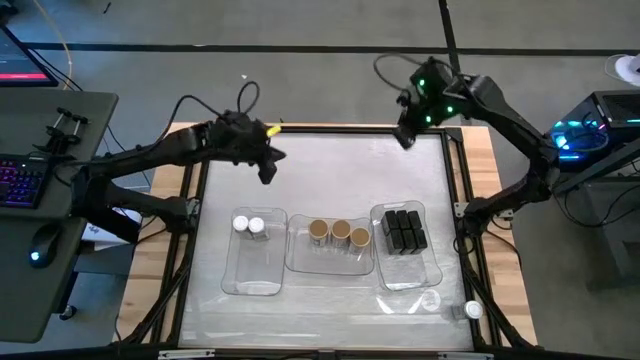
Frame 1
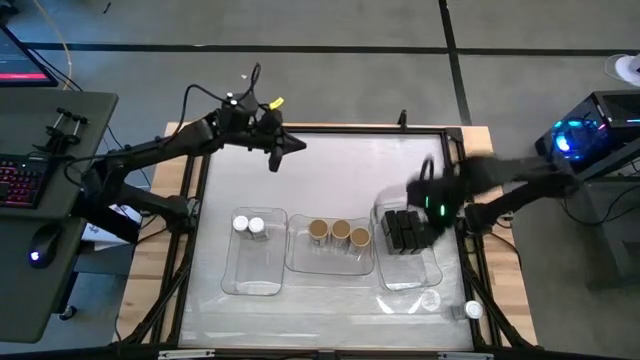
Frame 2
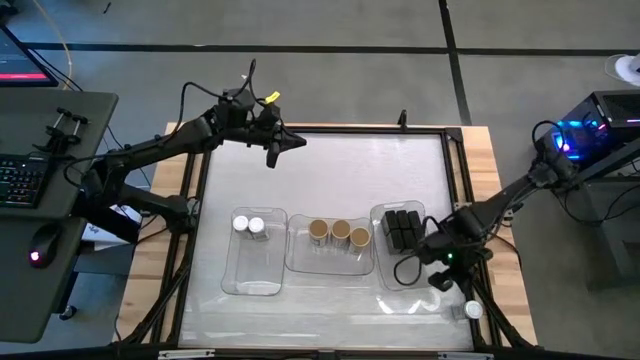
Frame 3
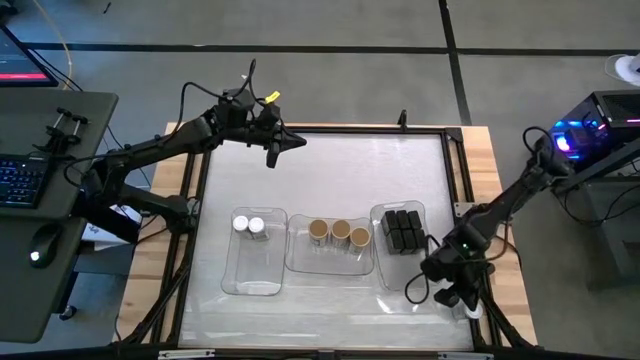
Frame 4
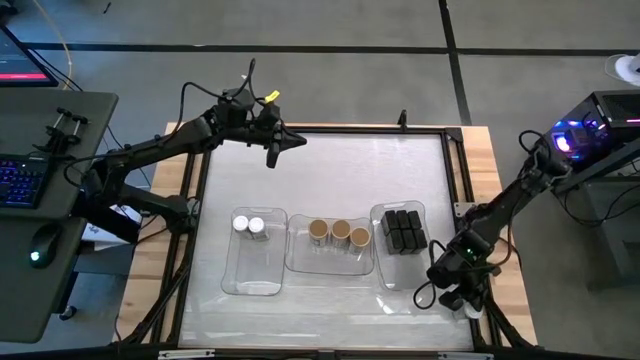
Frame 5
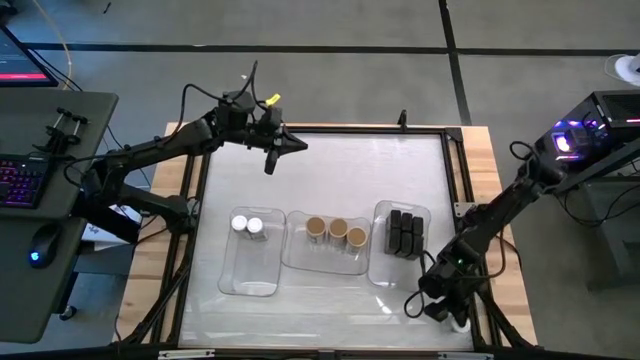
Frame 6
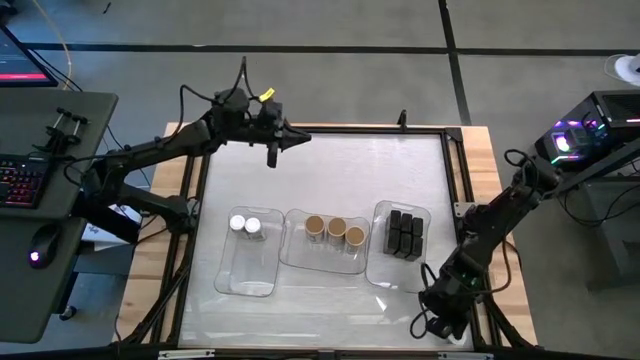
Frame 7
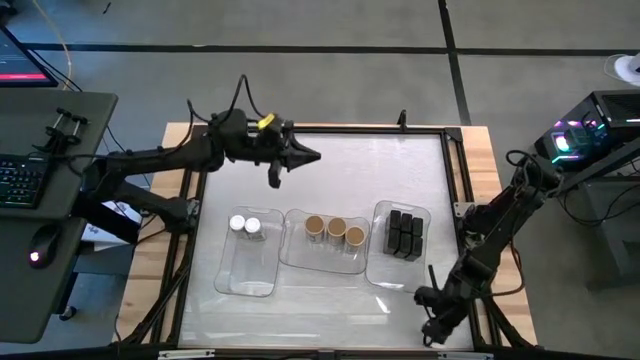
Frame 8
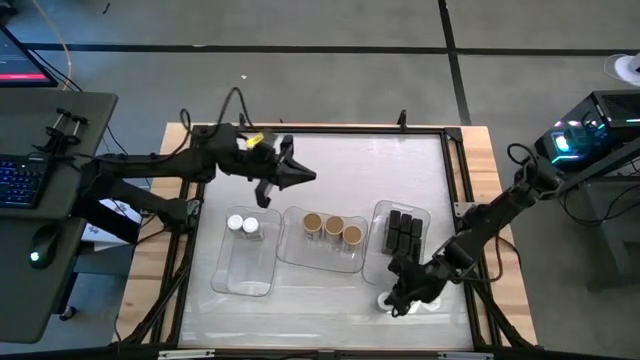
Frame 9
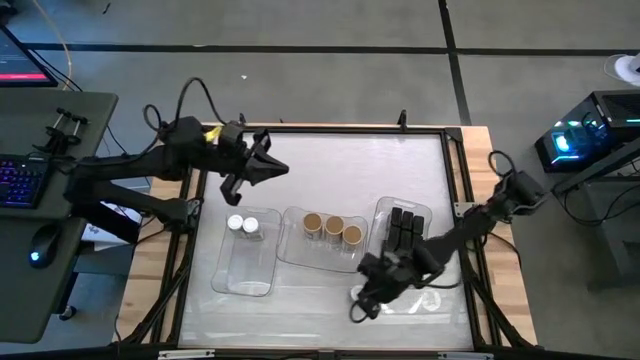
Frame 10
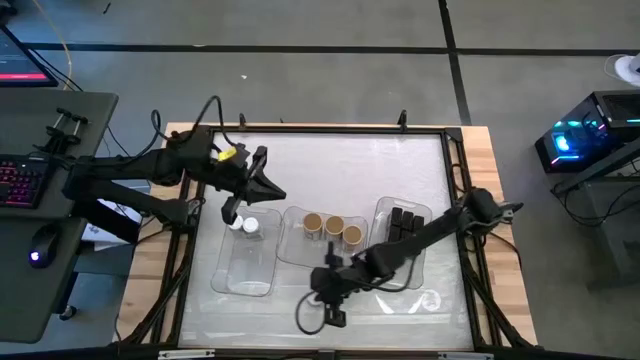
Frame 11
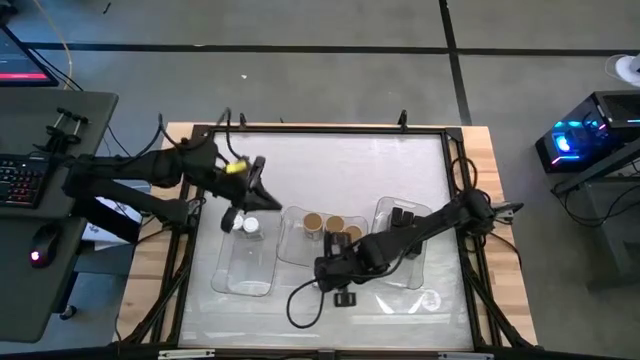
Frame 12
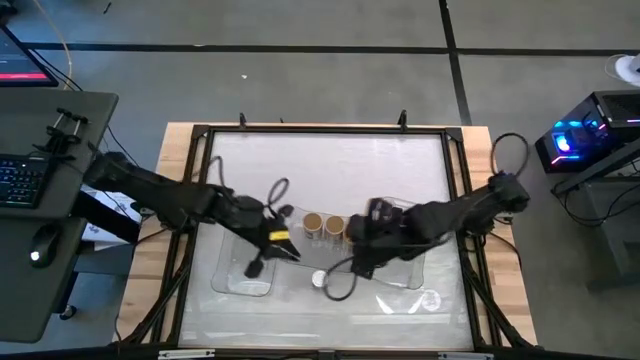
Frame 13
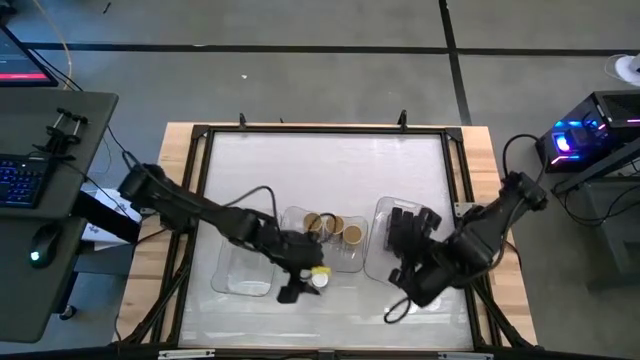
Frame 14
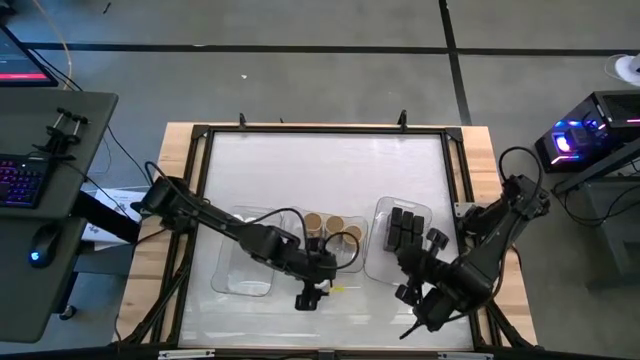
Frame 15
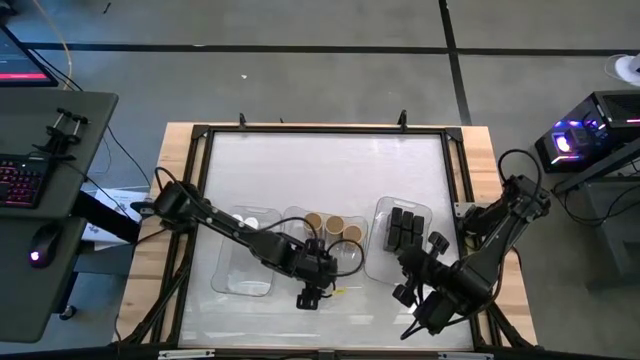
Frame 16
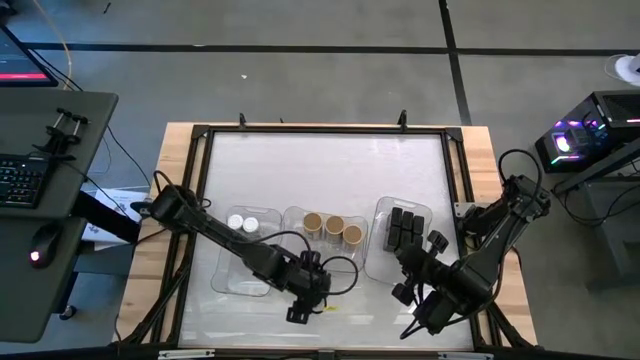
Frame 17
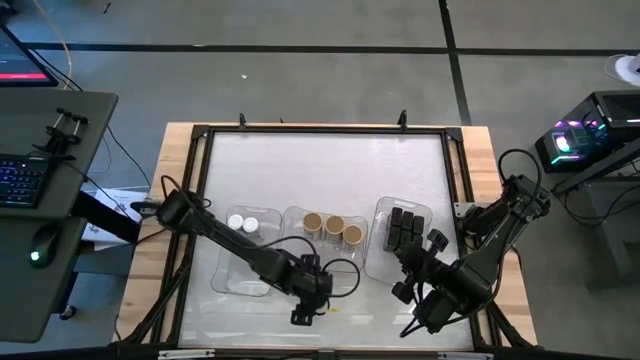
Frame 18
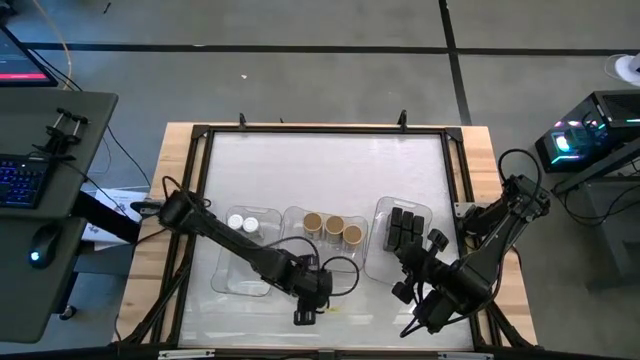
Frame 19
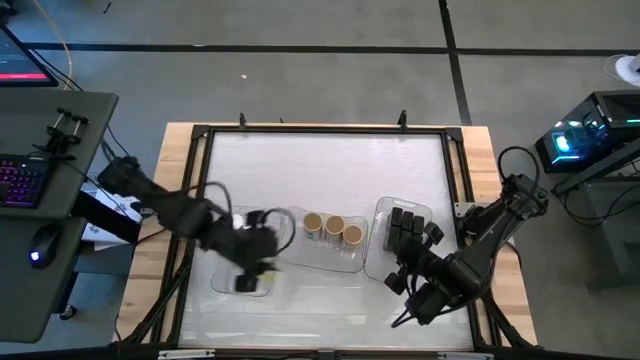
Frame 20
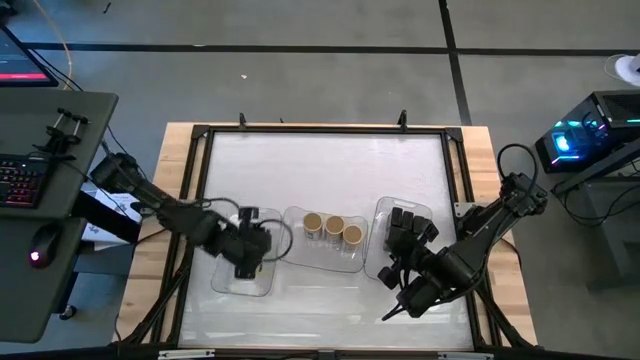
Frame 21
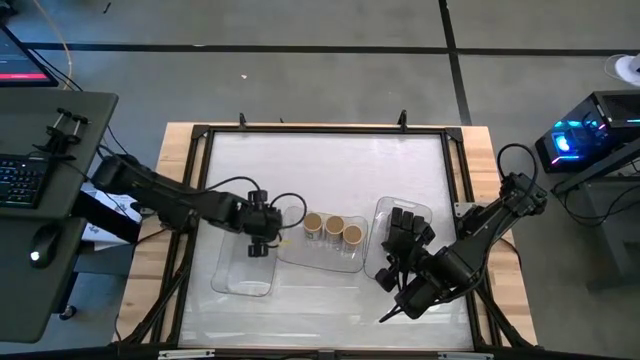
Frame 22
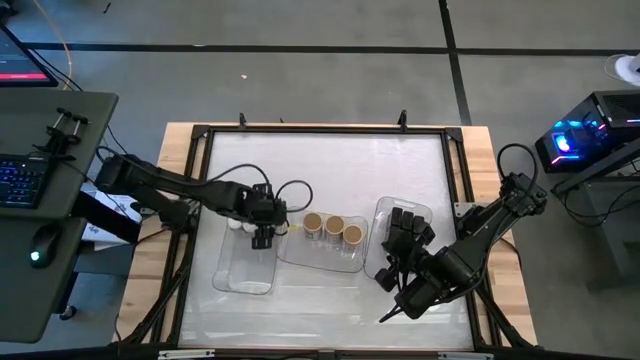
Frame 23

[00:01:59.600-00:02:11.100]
Task: Sort spices by type
Put the white seasoning bottle into the left transparent bin aligned with the other white seasoning bottles

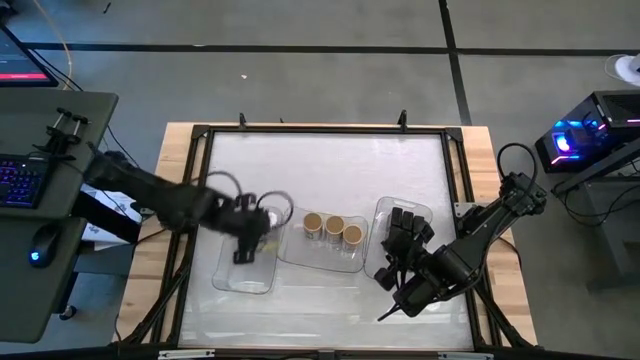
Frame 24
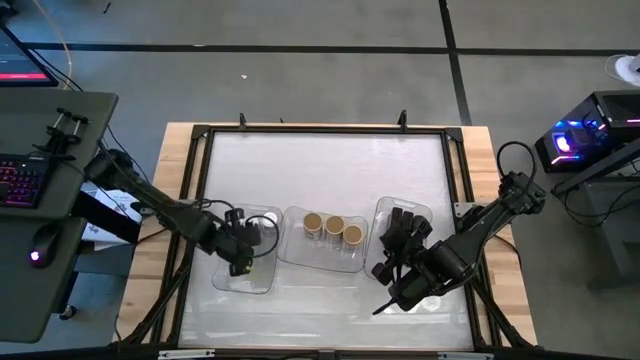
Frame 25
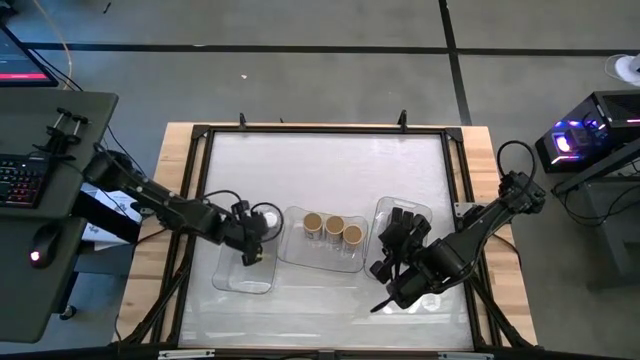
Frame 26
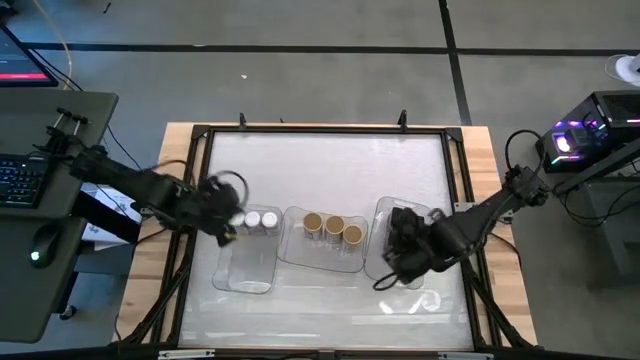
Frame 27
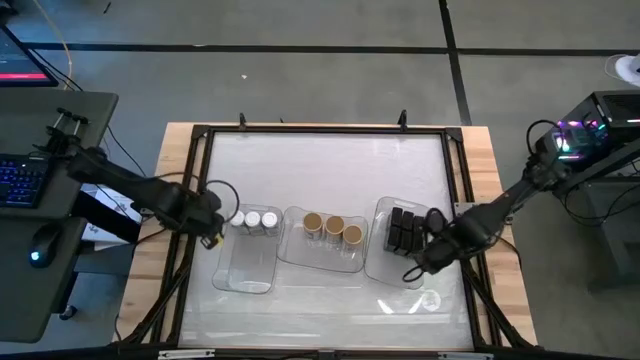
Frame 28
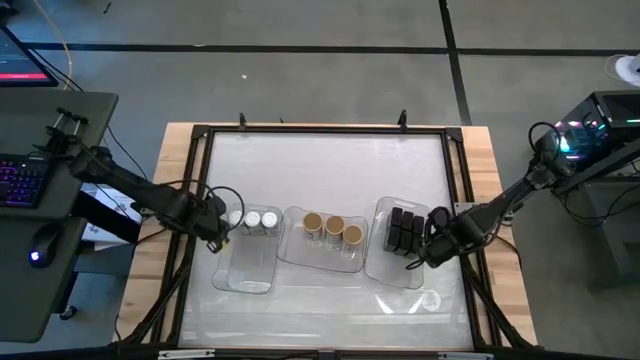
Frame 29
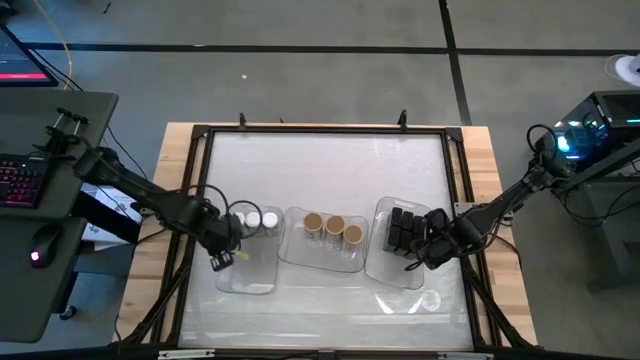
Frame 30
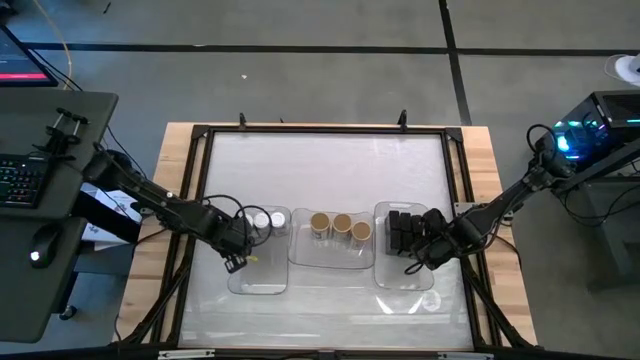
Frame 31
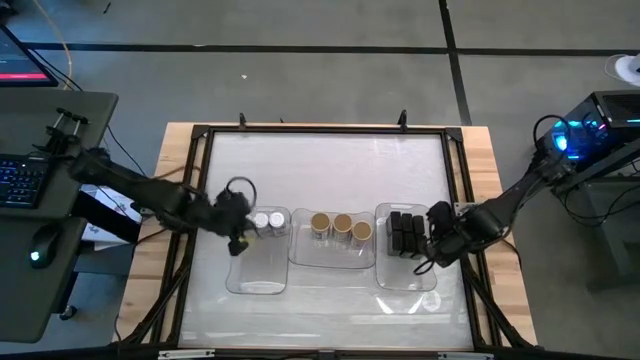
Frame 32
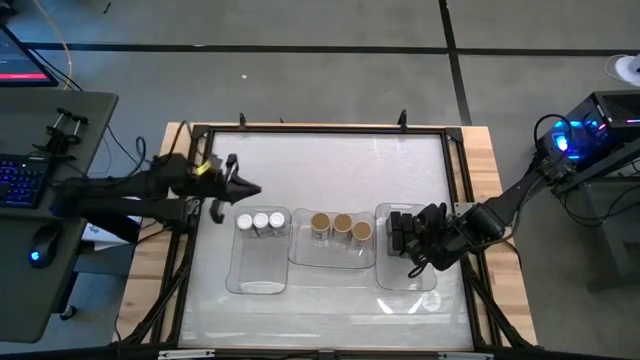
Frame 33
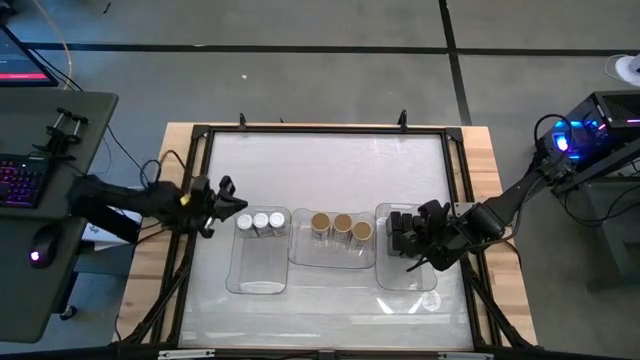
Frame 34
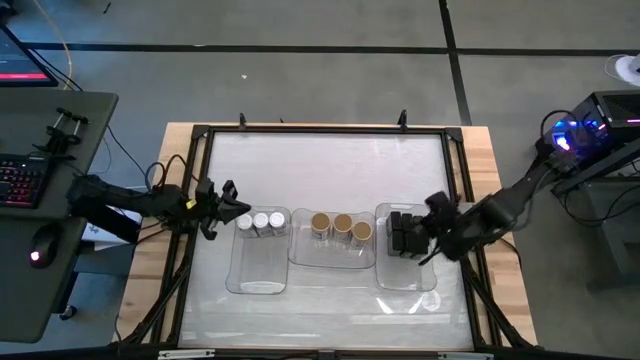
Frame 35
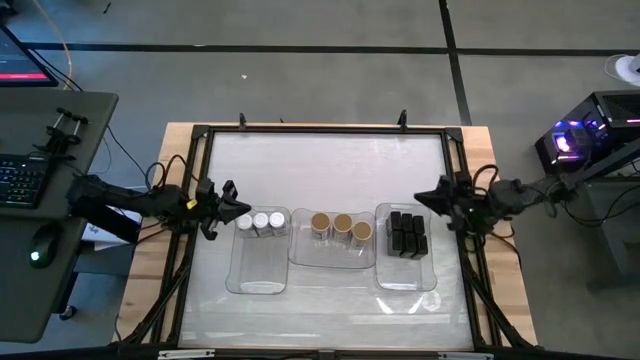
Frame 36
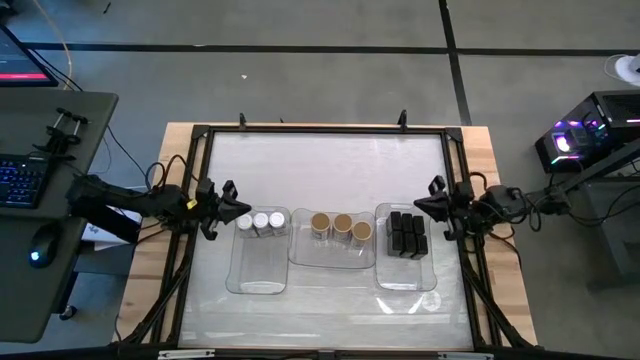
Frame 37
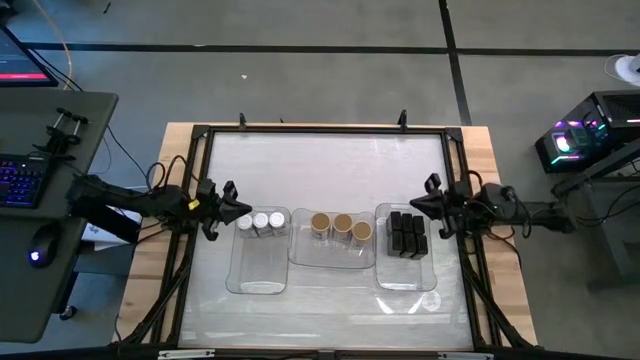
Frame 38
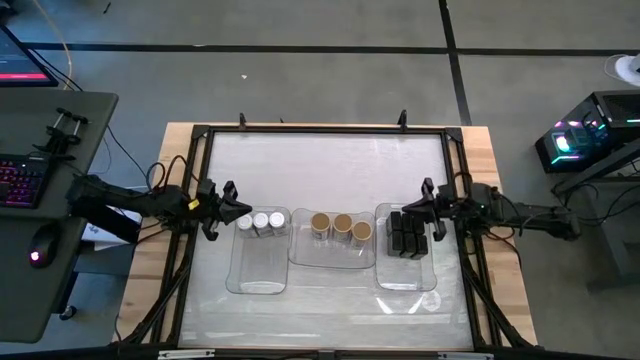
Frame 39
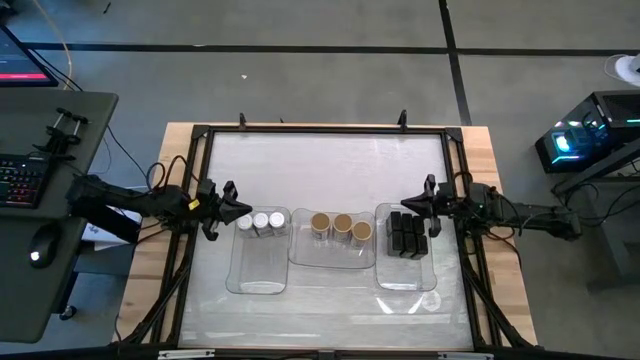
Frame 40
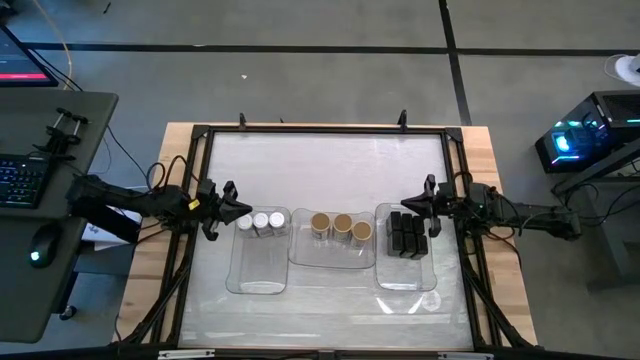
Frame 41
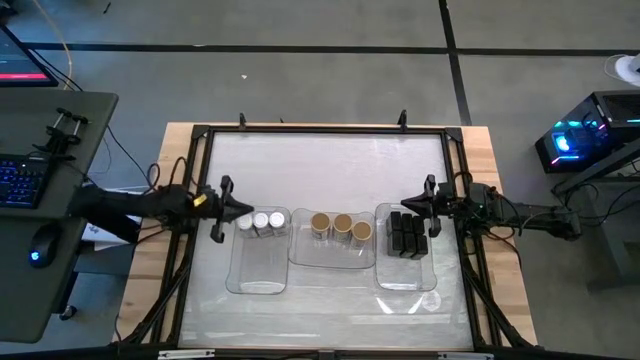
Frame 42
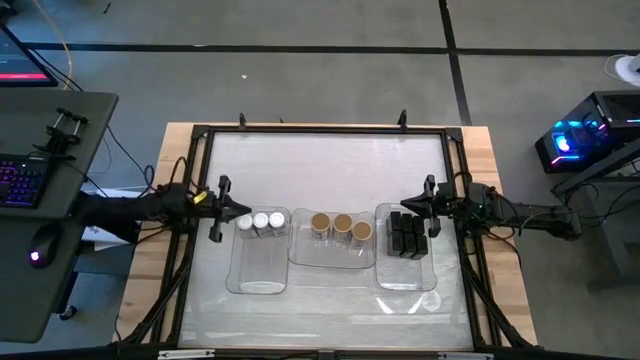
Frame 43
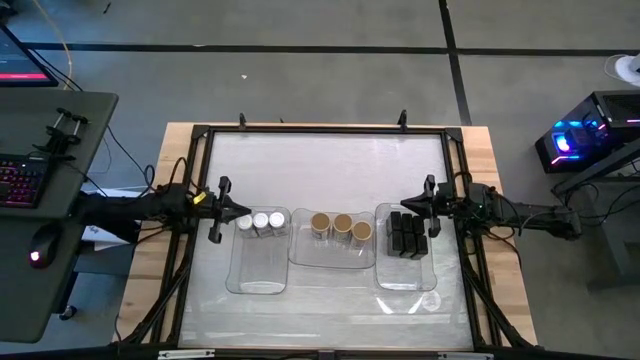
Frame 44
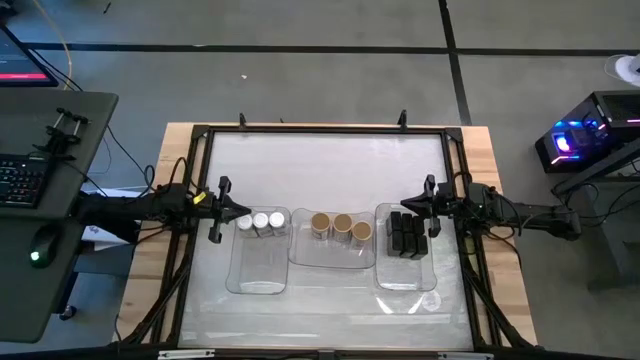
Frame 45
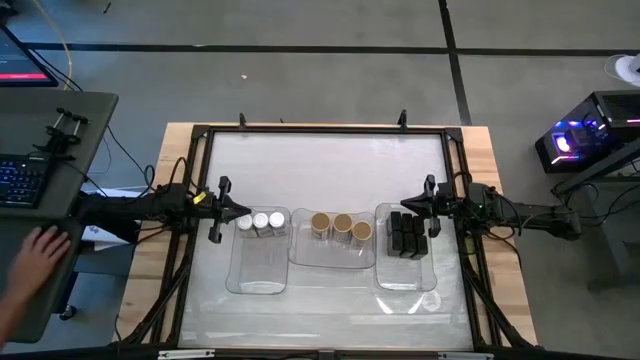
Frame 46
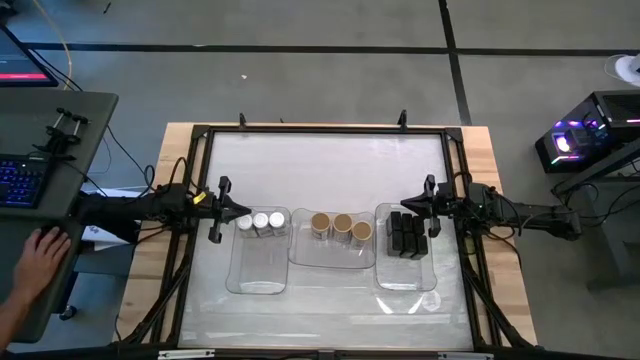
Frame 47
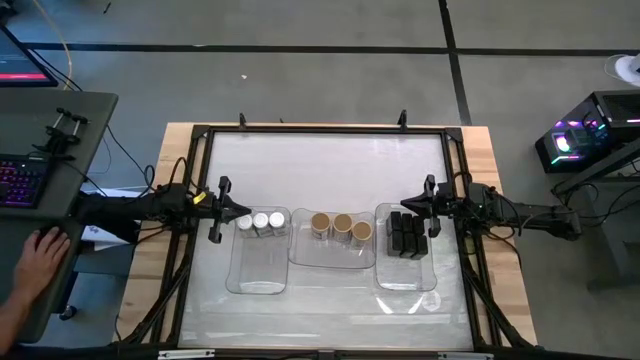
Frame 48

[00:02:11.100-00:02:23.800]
Return to Home Position
